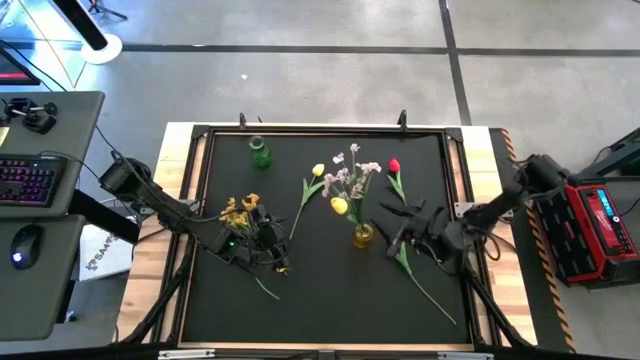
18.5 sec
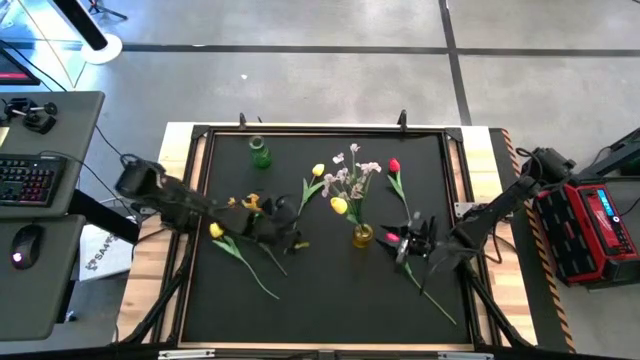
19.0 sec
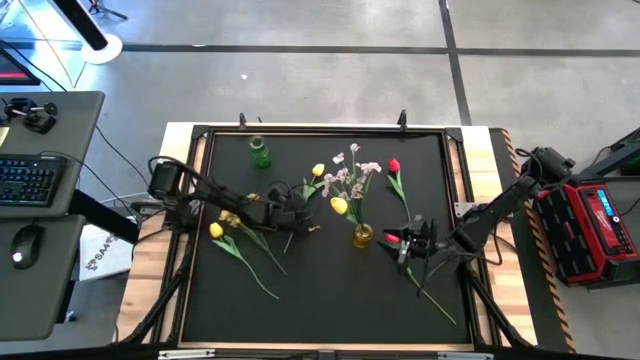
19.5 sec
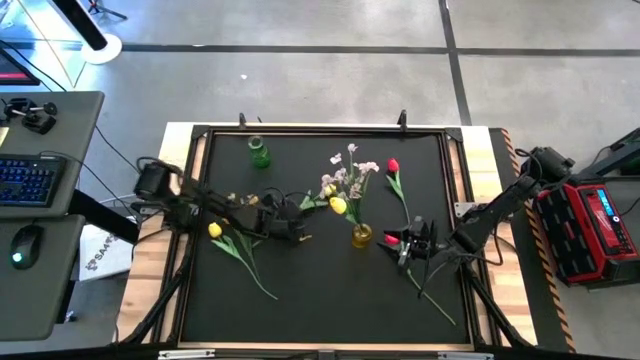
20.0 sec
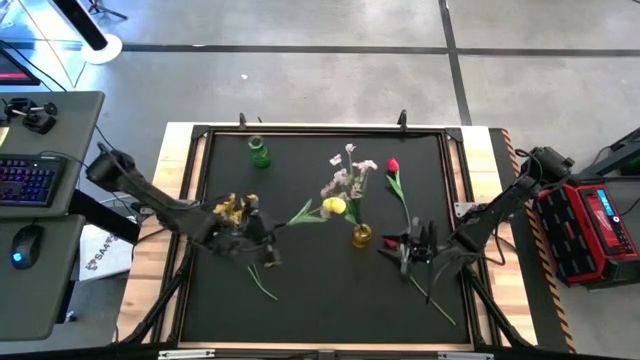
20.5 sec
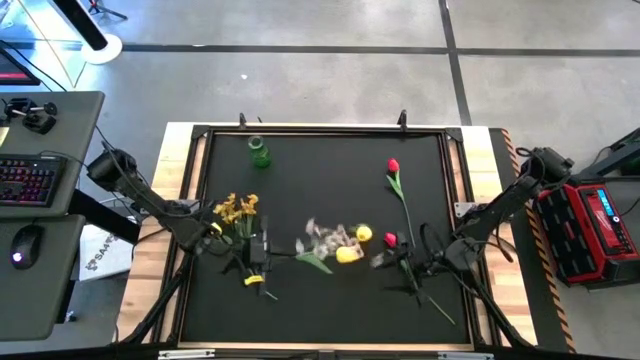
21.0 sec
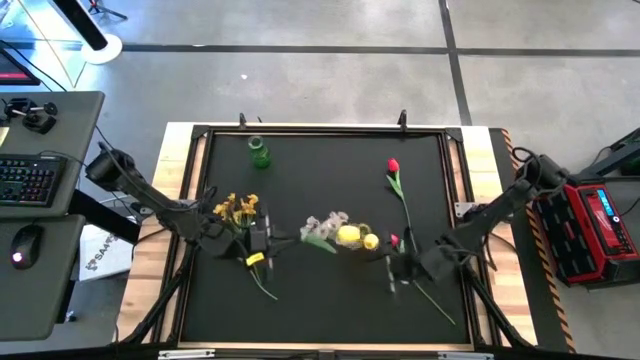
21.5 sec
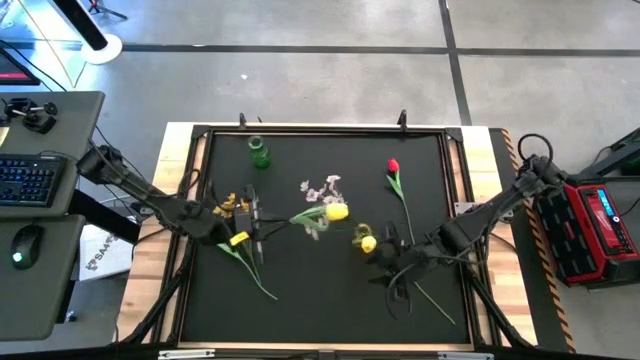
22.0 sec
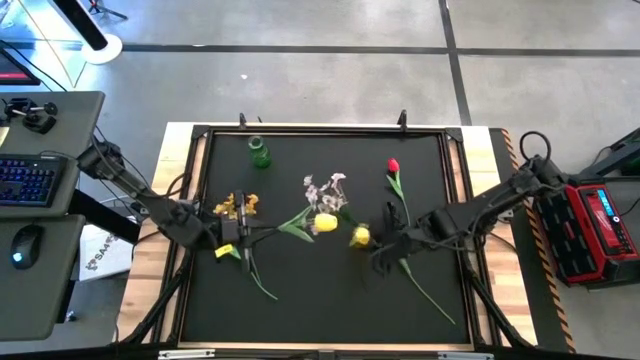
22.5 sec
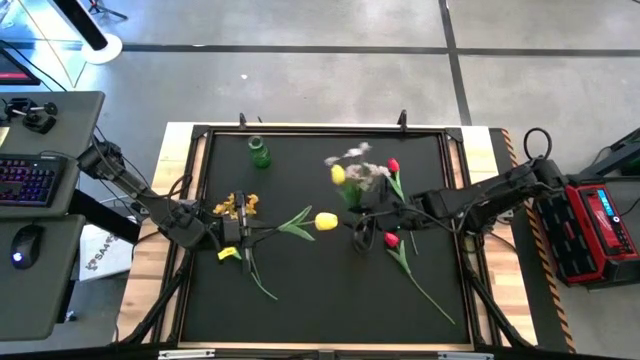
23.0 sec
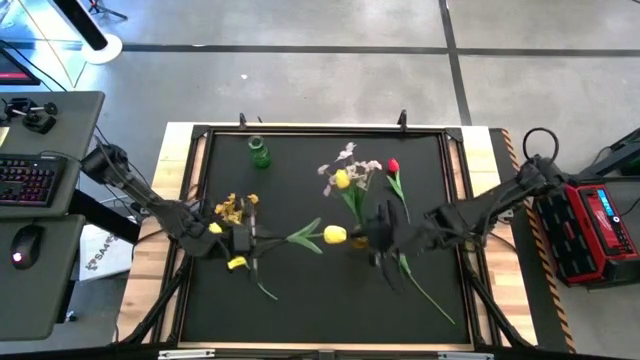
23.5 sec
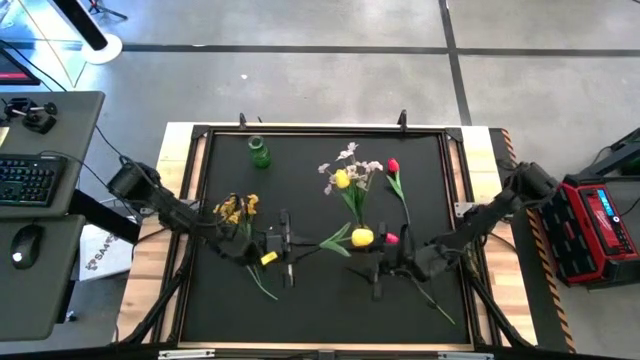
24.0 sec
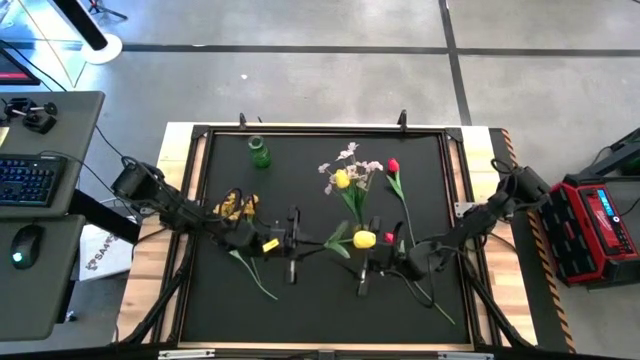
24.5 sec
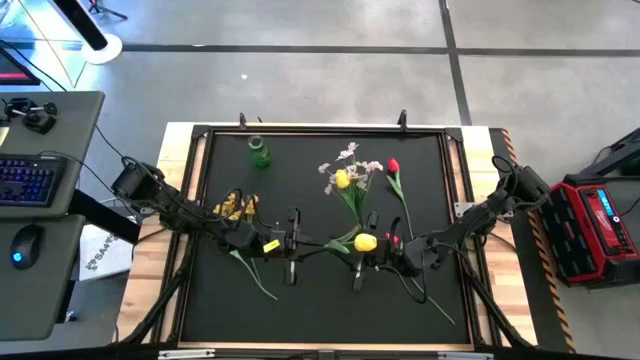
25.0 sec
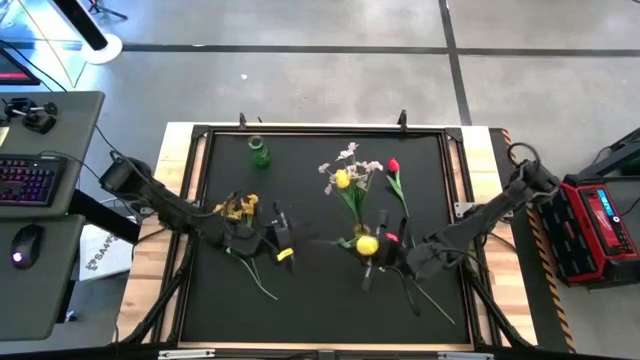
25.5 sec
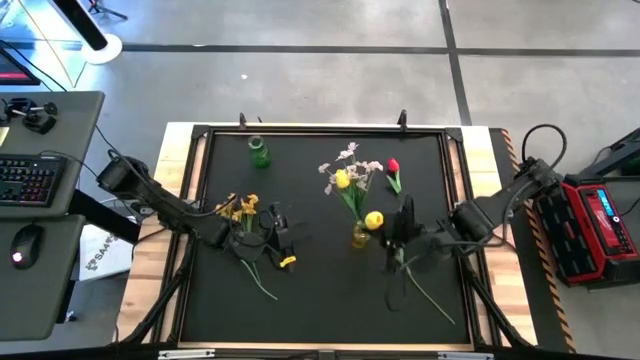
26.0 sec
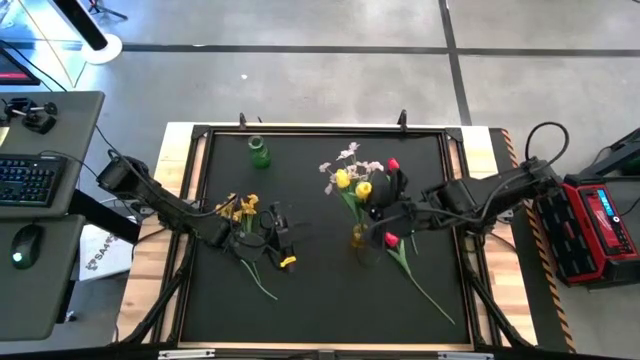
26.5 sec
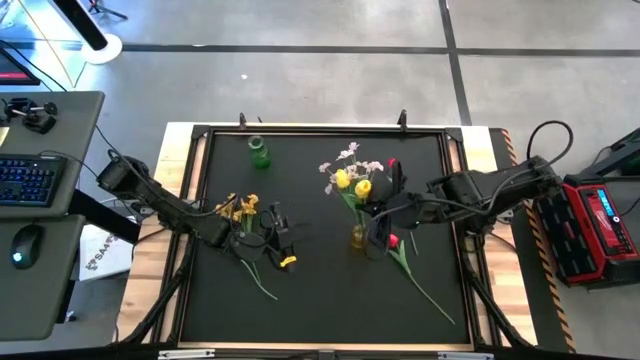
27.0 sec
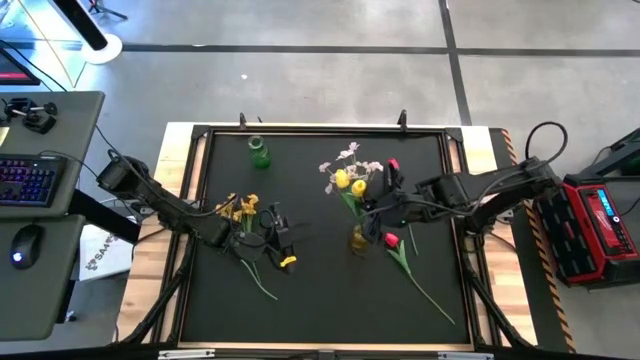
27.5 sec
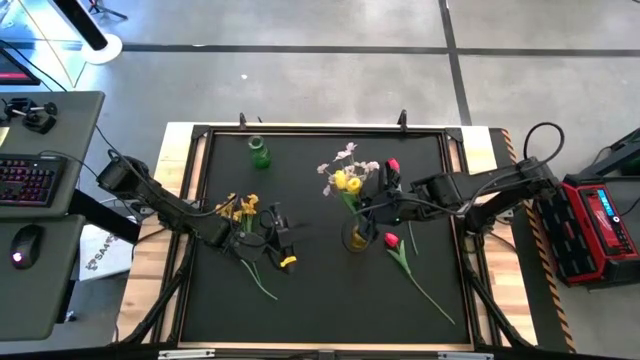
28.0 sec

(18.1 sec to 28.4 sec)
Task: Sort flowers into vase by color
Put the yellow tulip into the yellow vase

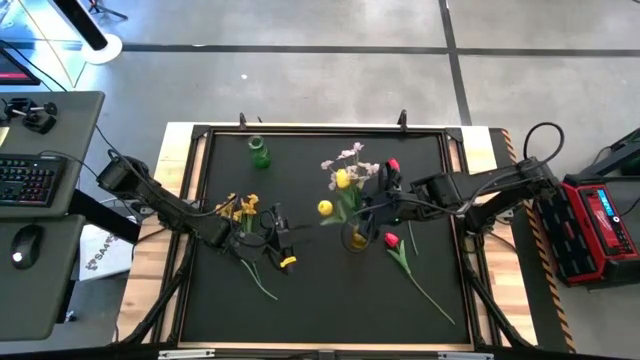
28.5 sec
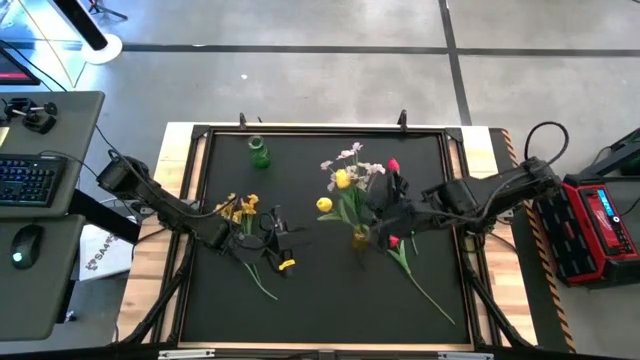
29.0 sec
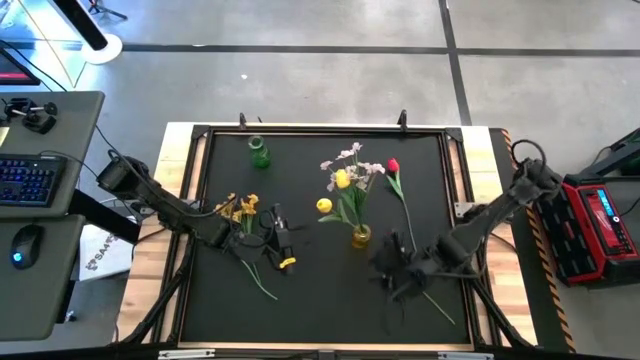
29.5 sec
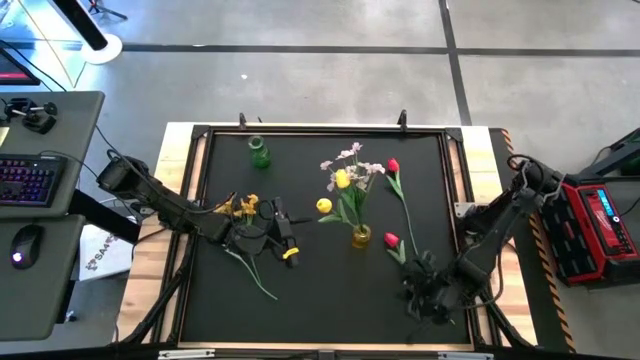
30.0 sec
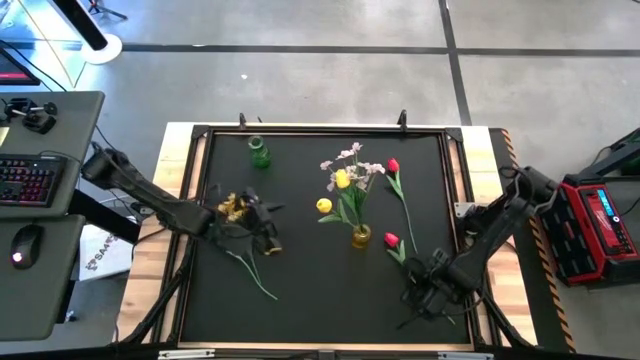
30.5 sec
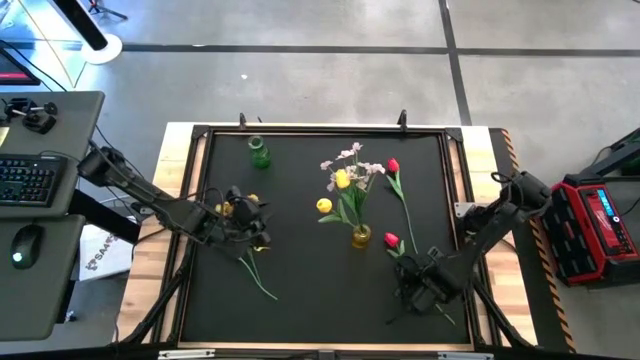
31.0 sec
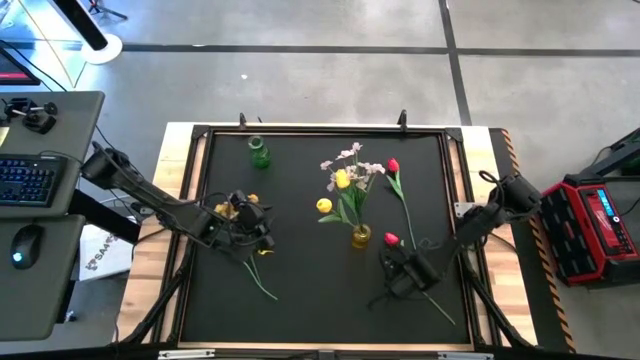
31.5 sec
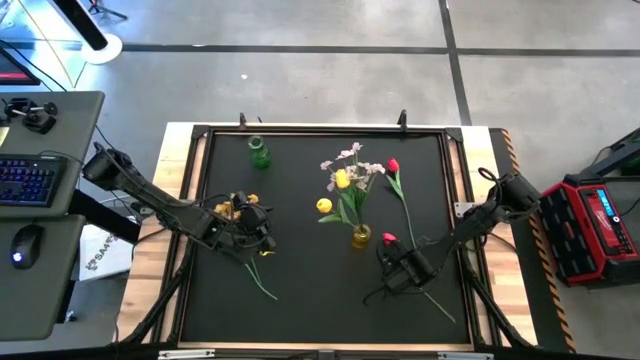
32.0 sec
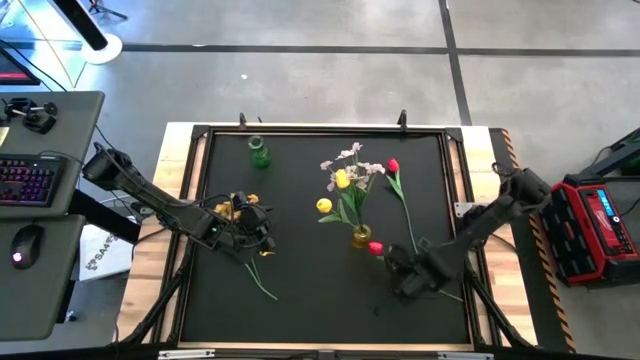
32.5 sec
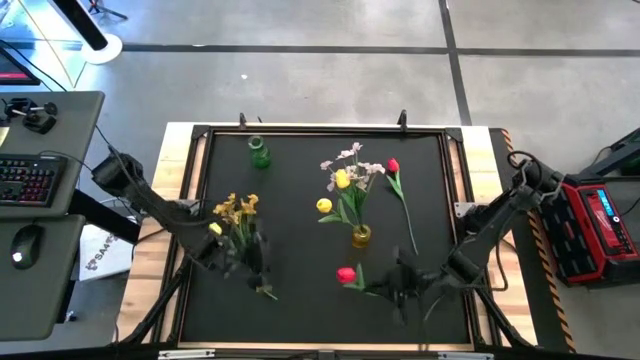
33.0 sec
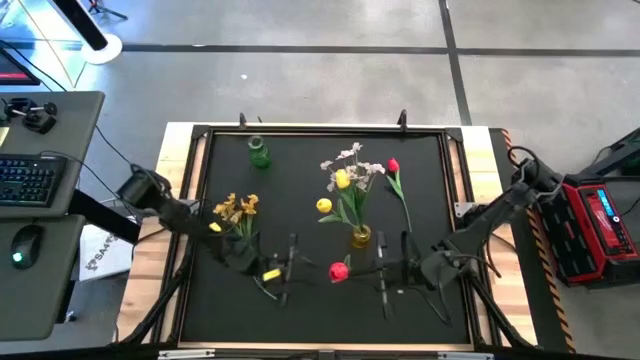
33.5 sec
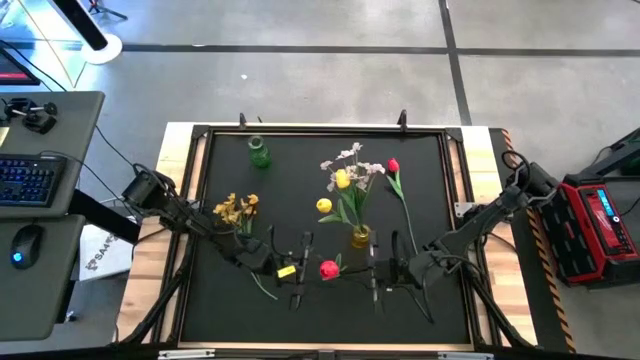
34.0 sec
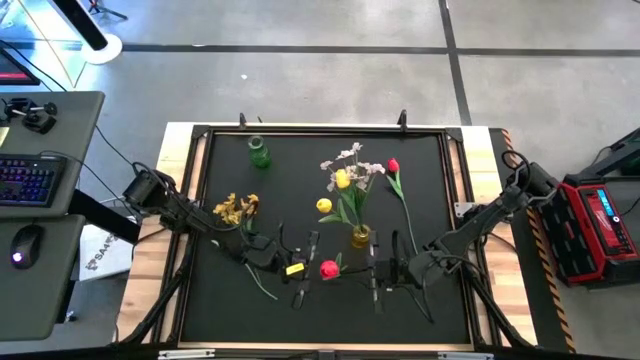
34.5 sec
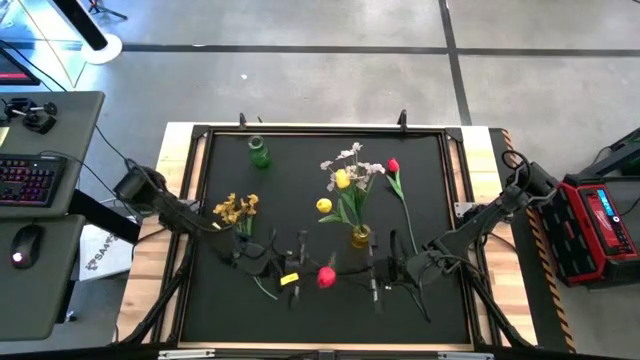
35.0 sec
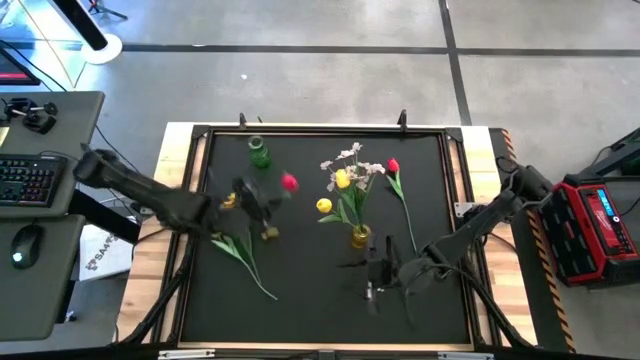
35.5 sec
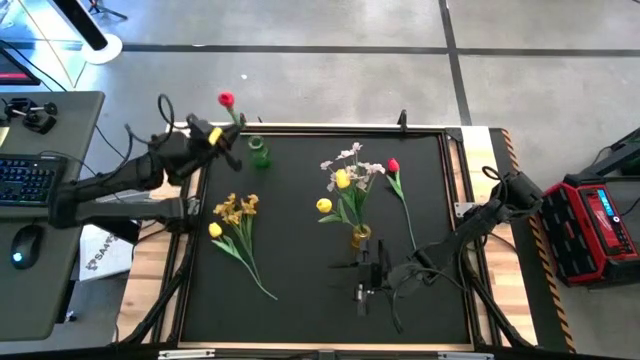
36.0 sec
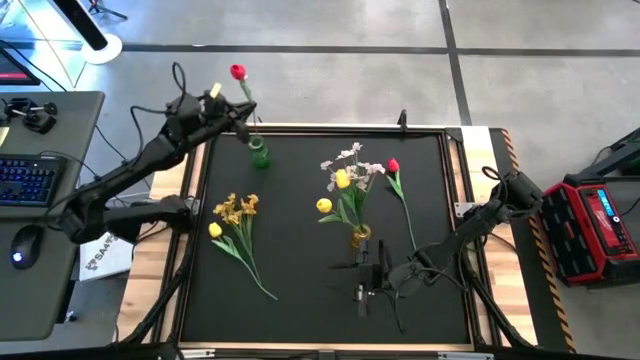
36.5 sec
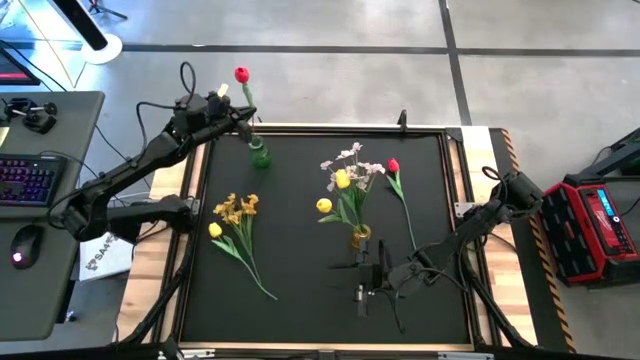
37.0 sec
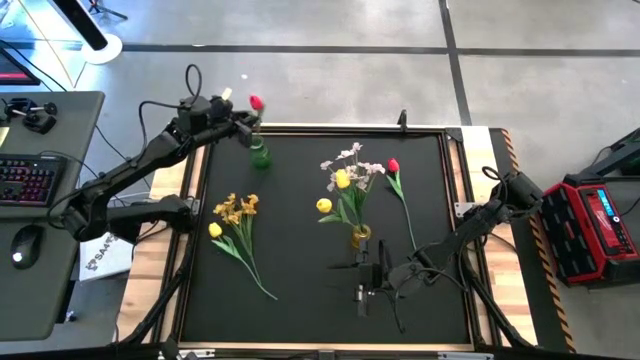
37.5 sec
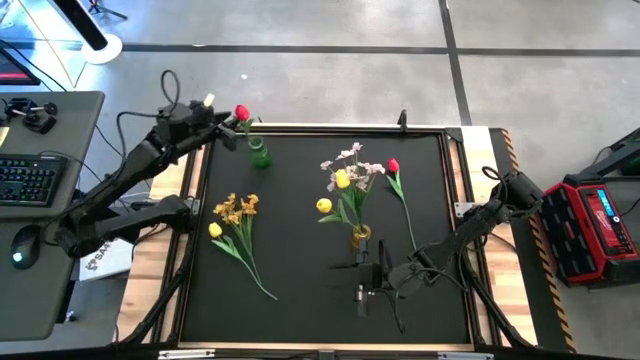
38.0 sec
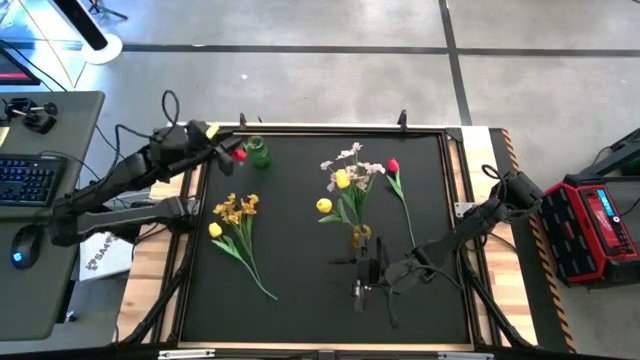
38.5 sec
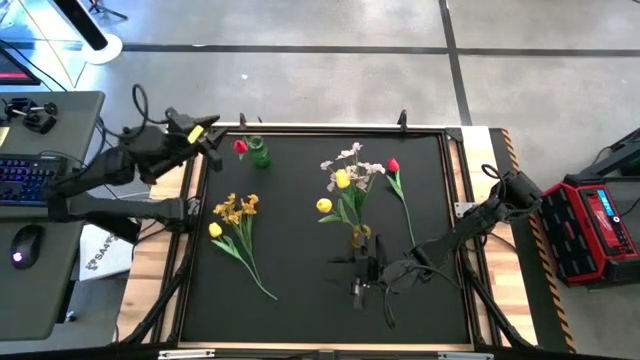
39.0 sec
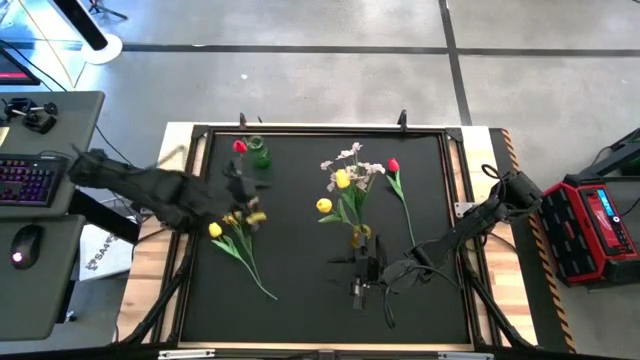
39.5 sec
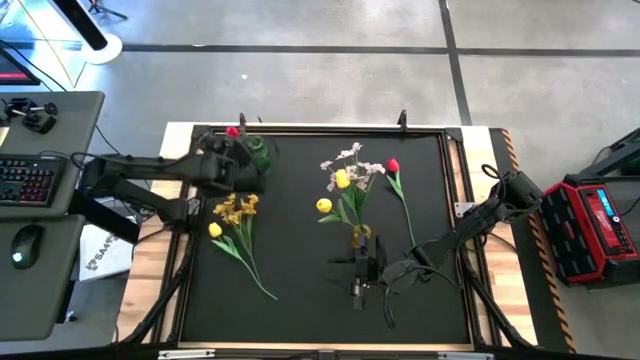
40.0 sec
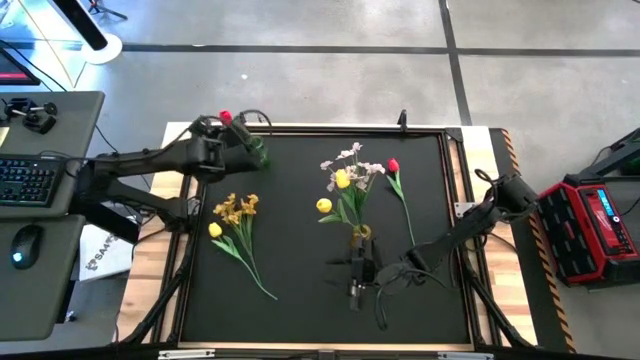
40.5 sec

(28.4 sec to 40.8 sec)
Put the bottom red tulip into the green vase
